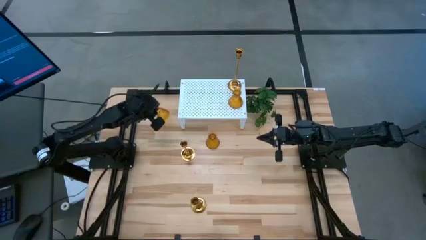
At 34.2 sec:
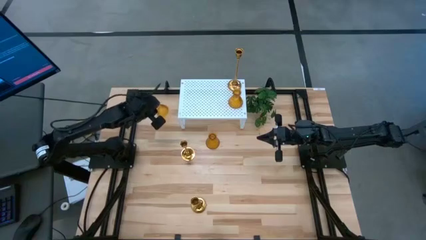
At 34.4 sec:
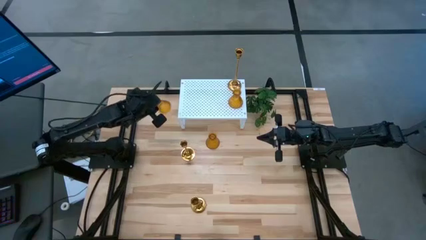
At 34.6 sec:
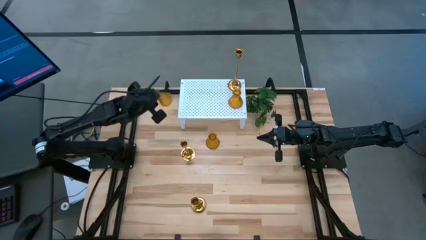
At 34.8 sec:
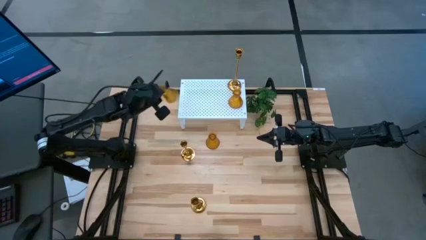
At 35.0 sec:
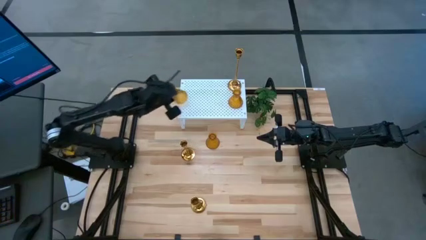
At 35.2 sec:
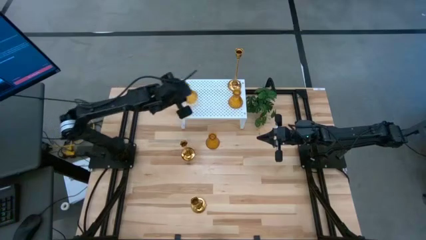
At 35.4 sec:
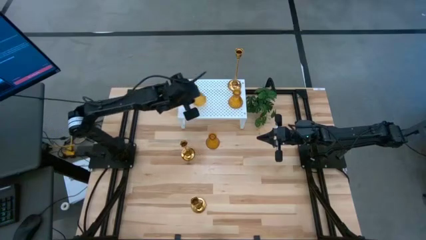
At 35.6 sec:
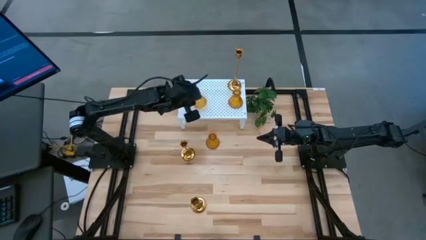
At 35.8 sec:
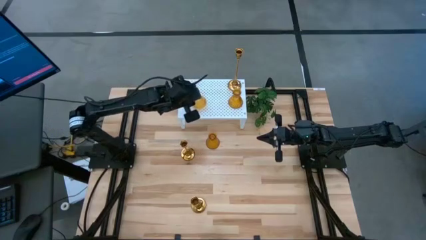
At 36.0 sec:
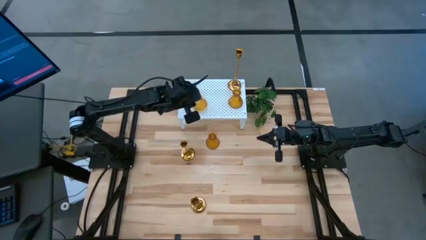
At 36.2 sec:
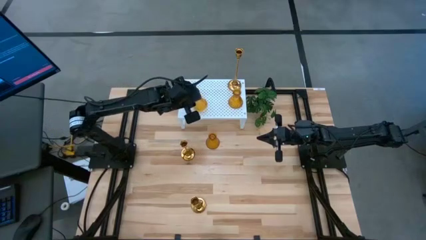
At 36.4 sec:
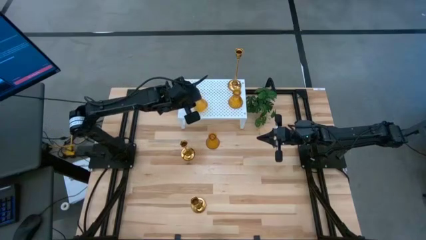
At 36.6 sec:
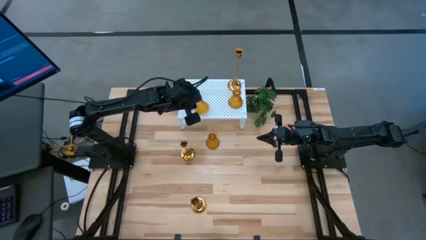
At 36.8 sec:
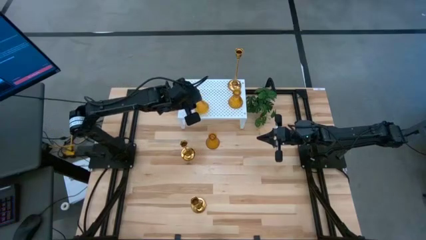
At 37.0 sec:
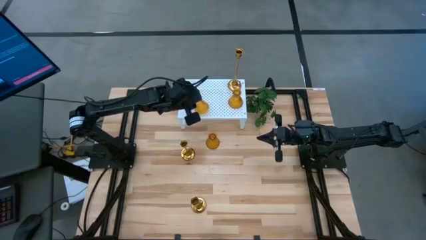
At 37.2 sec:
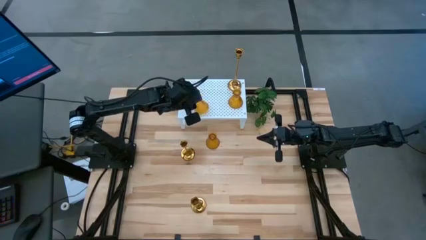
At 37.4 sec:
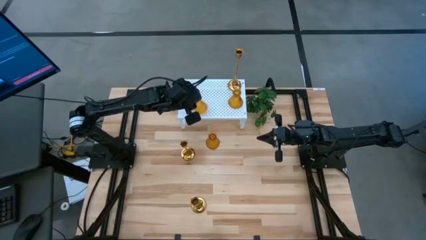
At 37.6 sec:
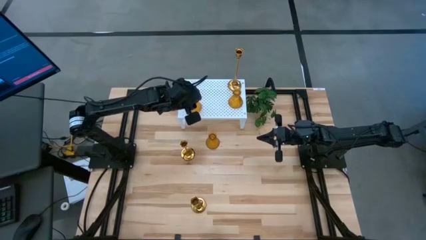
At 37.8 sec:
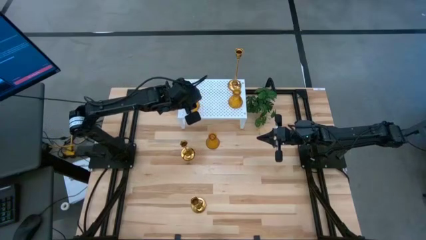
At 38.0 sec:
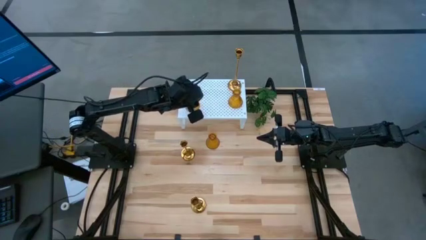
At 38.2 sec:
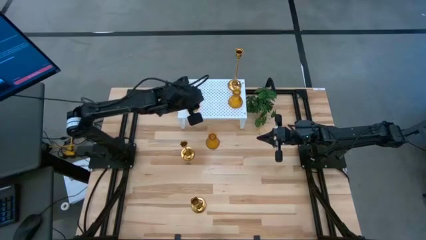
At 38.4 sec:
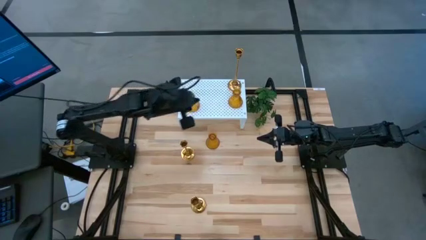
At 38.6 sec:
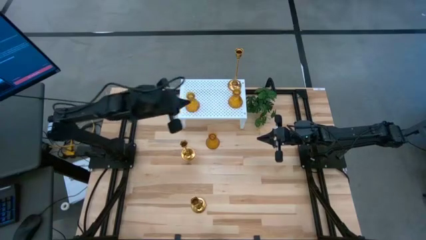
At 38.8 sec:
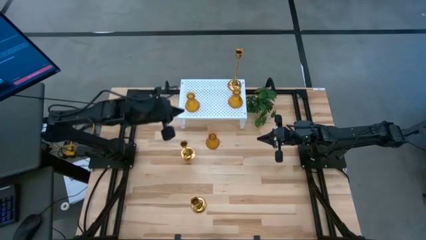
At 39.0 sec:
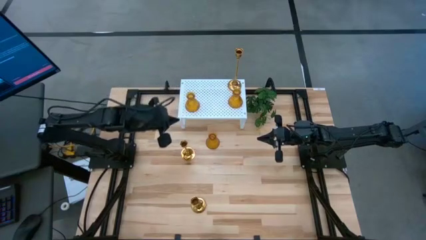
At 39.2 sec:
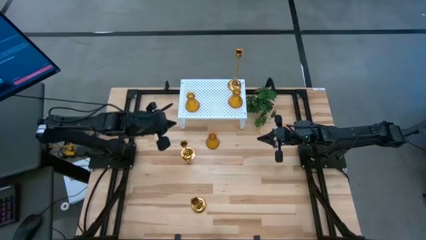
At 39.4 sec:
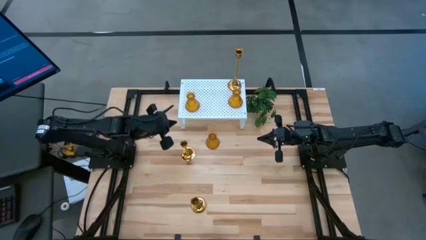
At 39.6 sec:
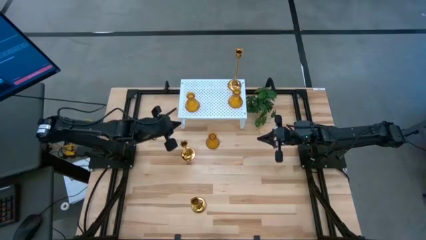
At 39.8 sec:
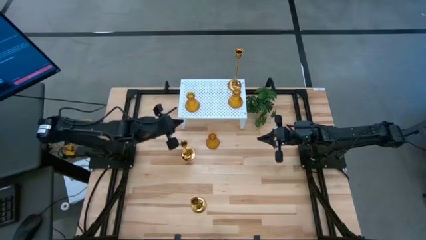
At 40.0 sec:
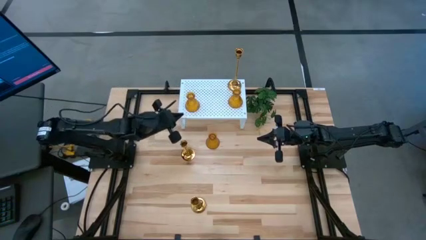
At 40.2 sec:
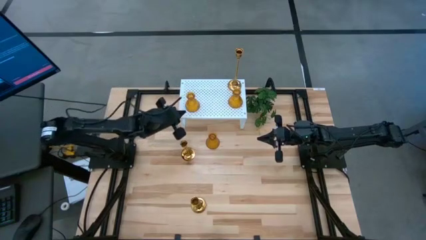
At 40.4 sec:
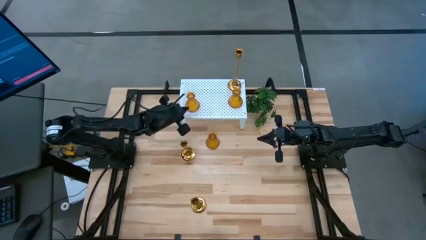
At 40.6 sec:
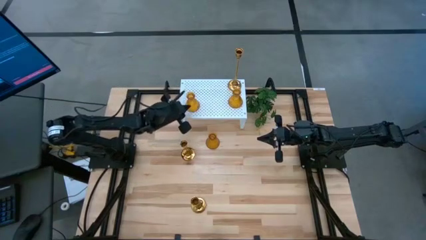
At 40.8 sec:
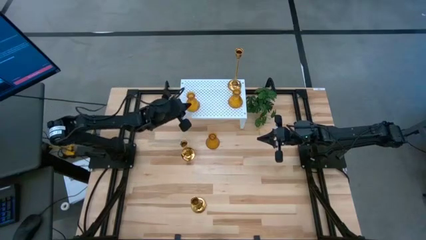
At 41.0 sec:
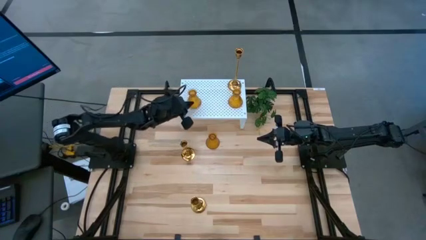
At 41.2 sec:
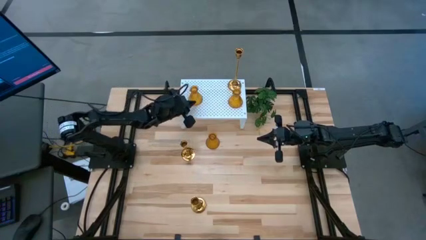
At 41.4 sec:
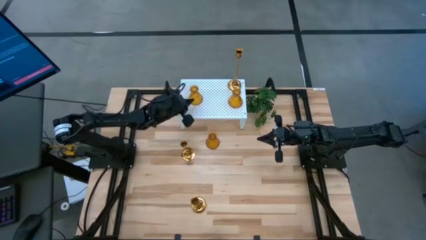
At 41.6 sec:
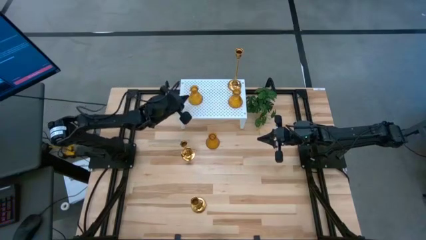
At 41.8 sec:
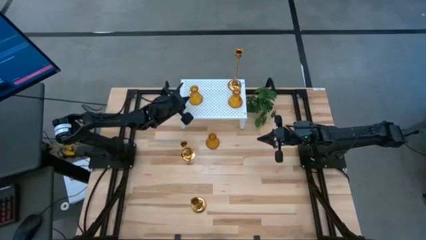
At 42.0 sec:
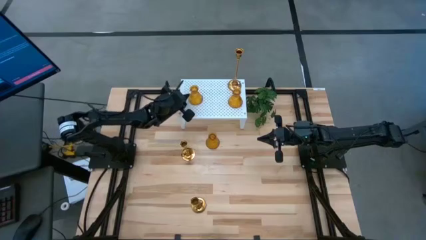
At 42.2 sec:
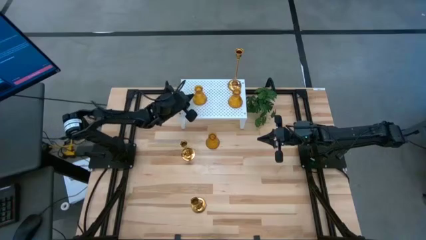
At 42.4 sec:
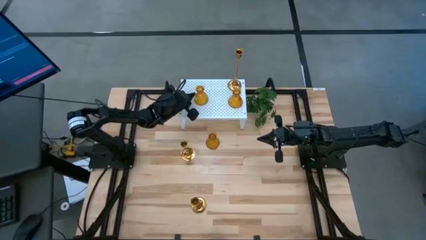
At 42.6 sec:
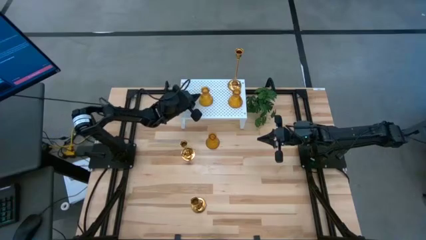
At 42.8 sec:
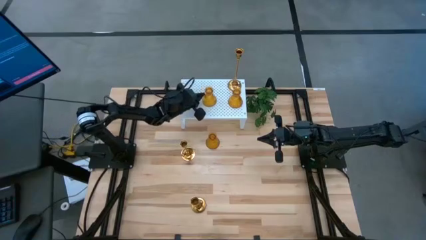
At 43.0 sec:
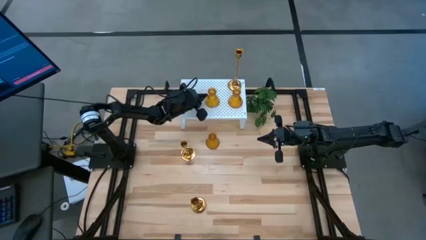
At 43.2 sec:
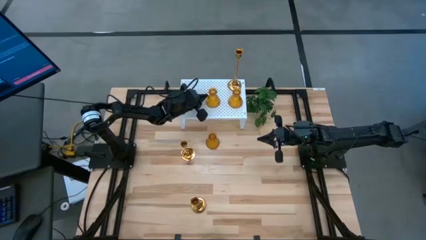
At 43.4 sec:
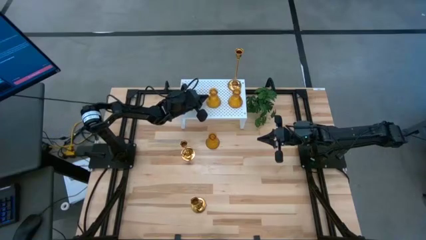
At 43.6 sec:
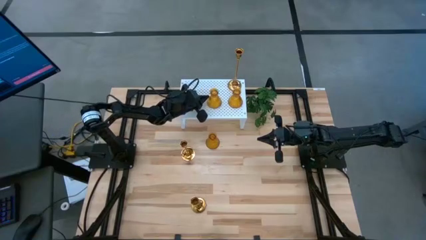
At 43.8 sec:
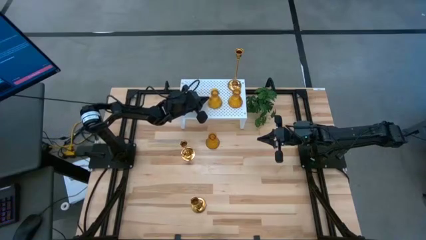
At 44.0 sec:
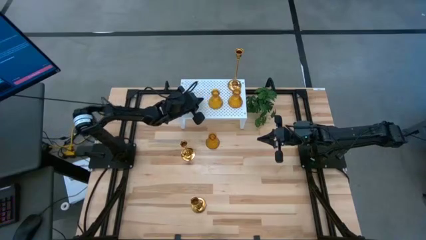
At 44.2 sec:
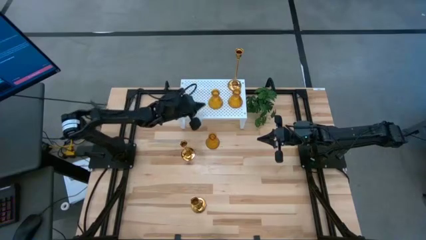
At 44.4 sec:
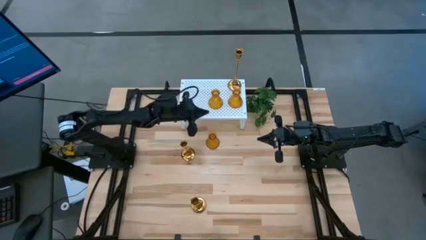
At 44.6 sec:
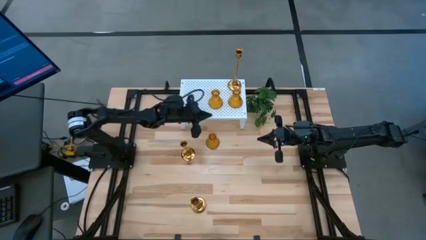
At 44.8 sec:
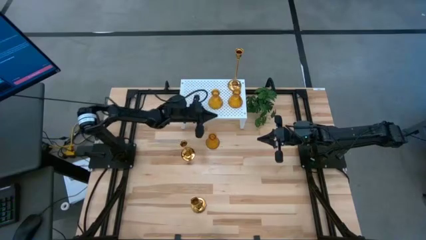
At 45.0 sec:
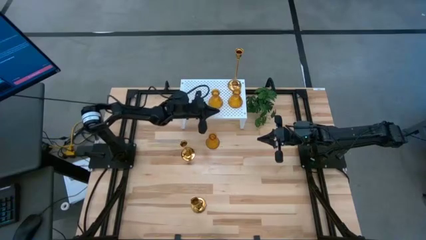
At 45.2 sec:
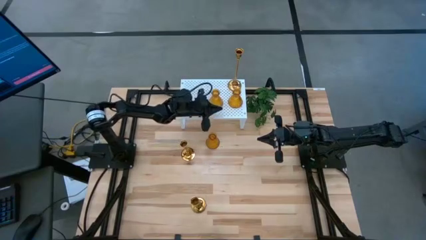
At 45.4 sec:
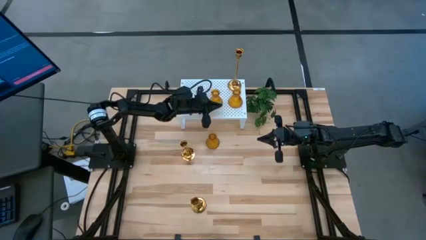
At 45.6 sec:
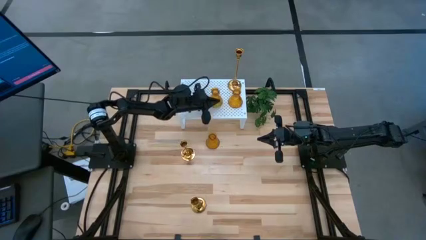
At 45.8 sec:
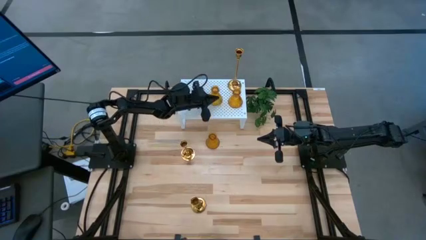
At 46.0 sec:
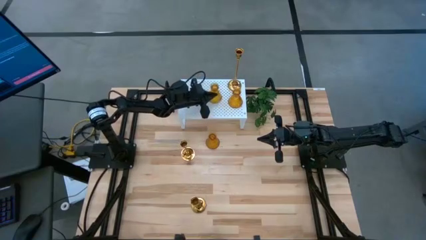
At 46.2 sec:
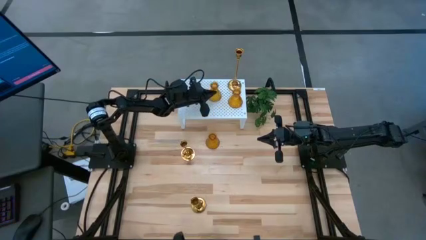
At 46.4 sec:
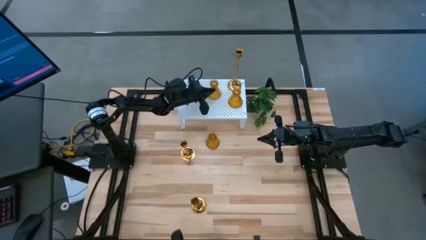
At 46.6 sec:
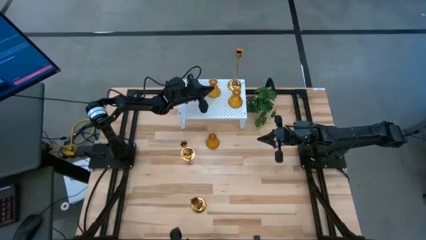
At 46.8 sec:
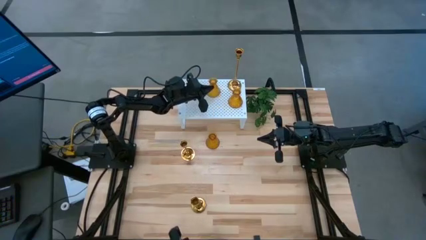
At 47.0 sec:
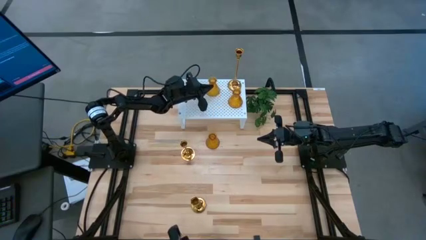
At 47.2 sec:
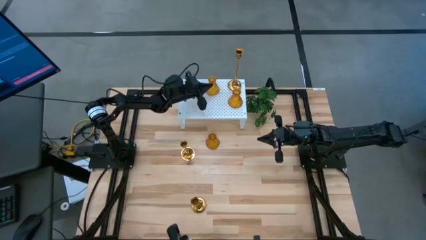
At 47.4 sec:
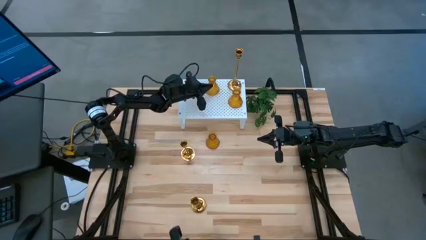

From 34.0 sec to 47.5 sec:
Task: Pick & Place candle stick holders
Put the top gold vase on the shelf
